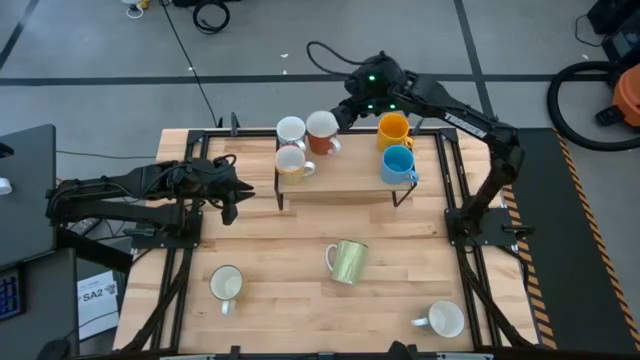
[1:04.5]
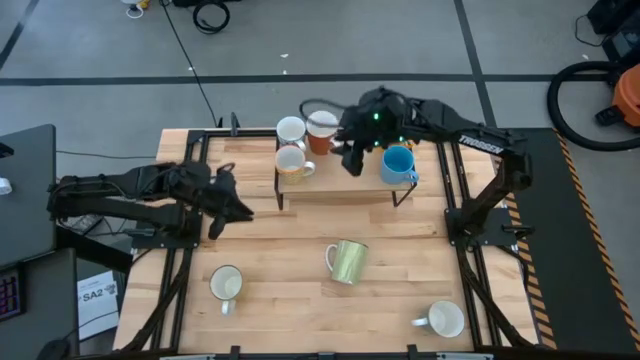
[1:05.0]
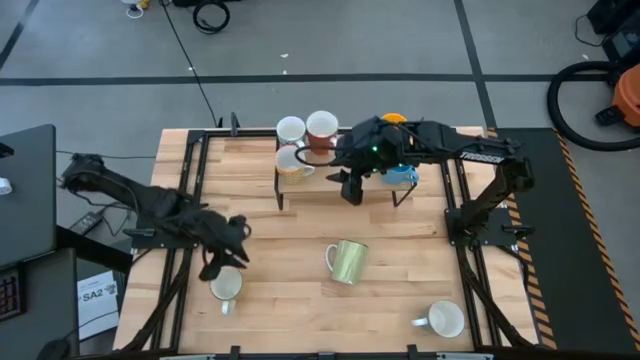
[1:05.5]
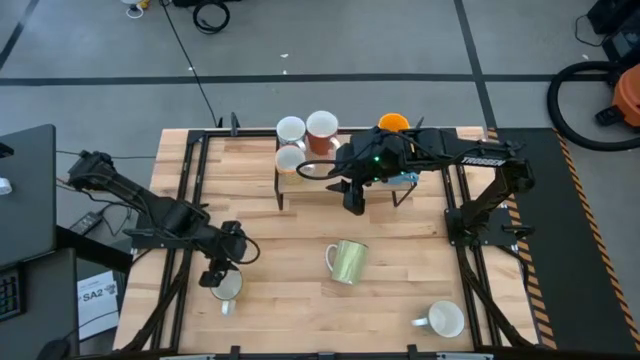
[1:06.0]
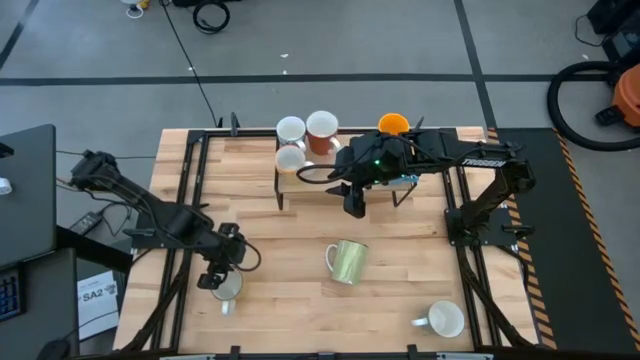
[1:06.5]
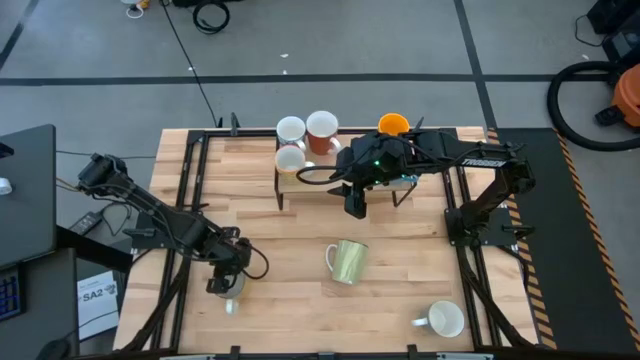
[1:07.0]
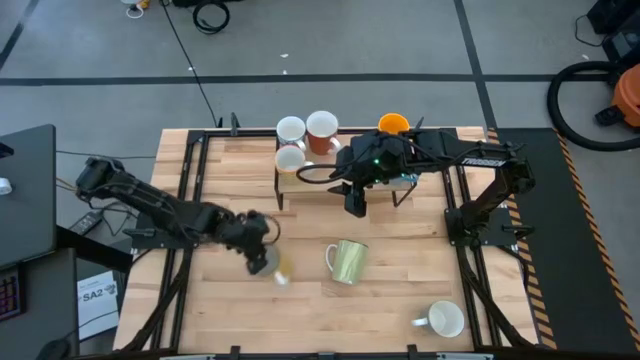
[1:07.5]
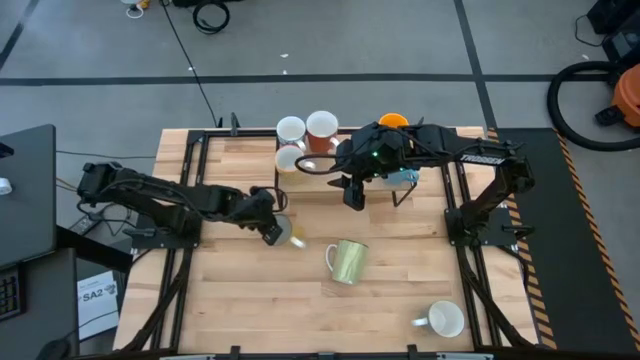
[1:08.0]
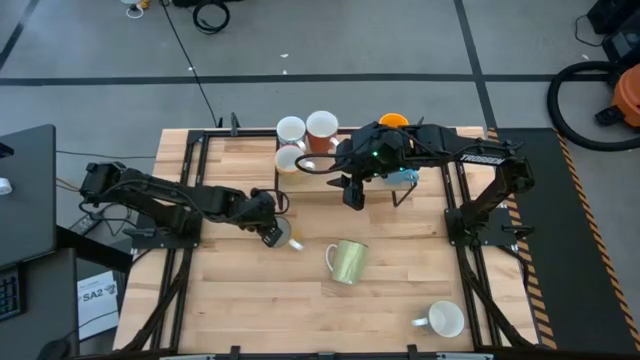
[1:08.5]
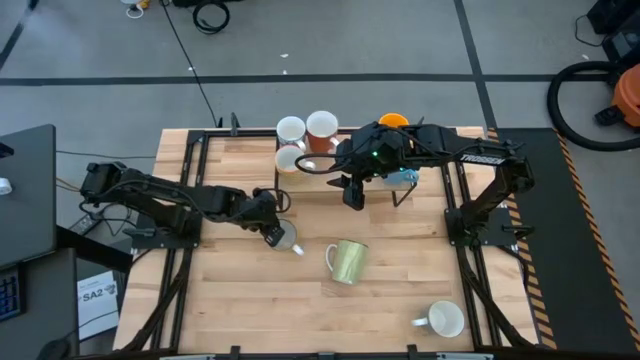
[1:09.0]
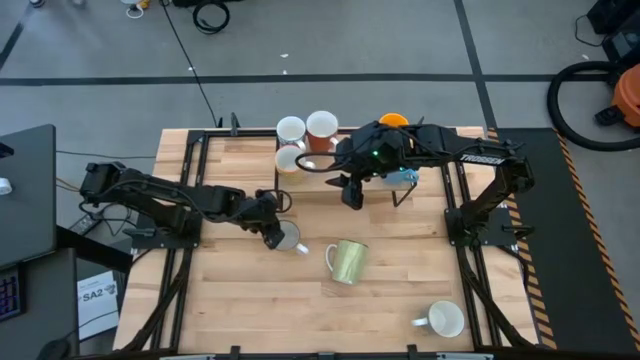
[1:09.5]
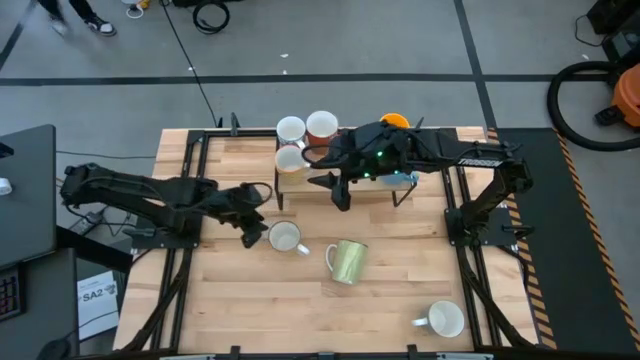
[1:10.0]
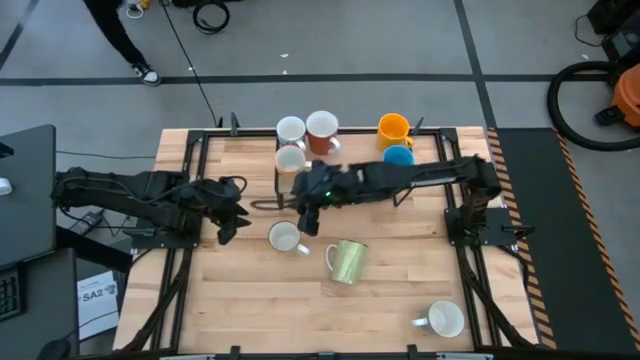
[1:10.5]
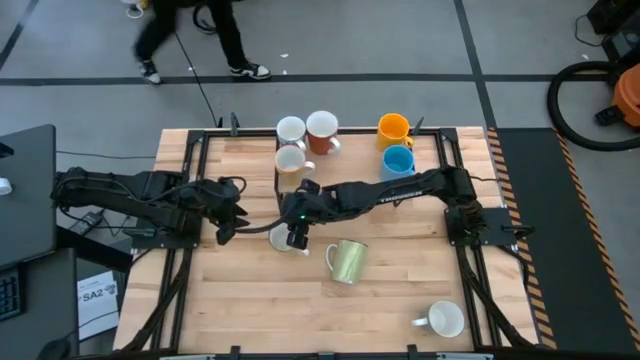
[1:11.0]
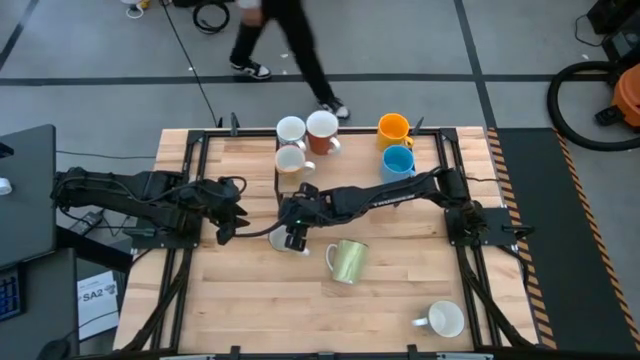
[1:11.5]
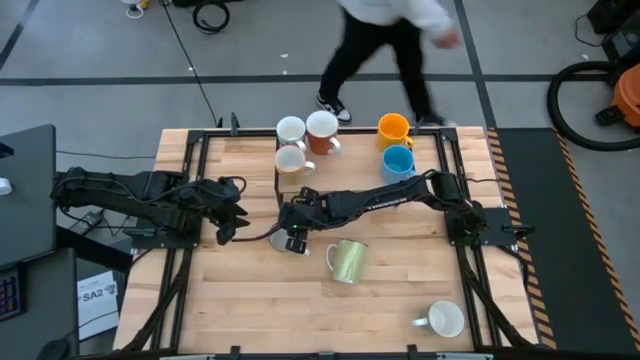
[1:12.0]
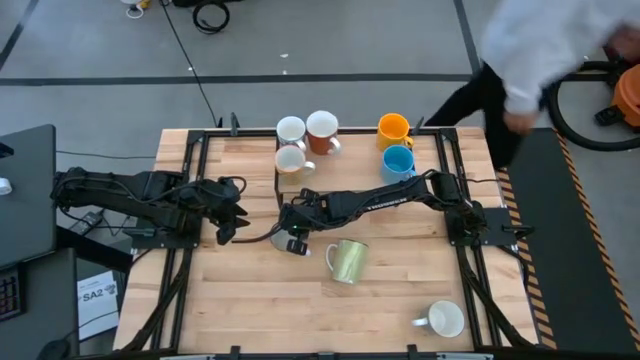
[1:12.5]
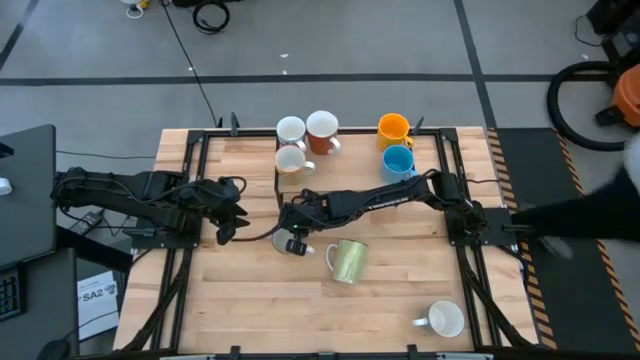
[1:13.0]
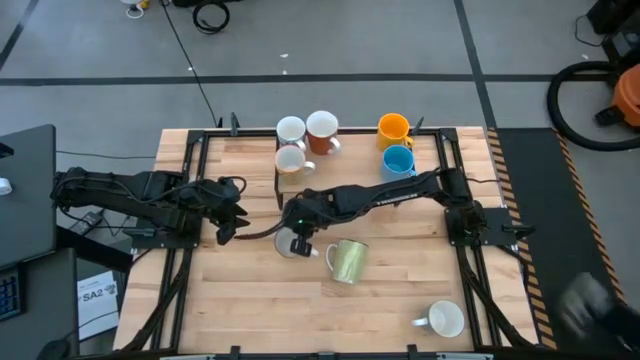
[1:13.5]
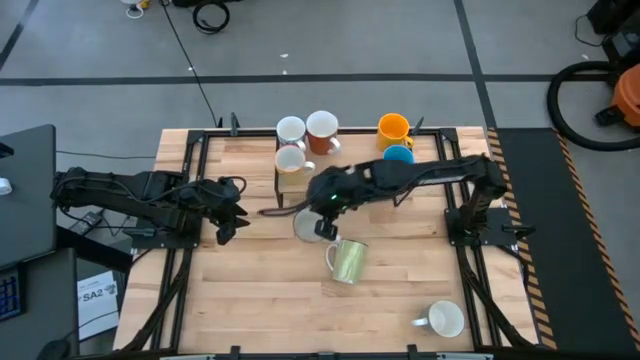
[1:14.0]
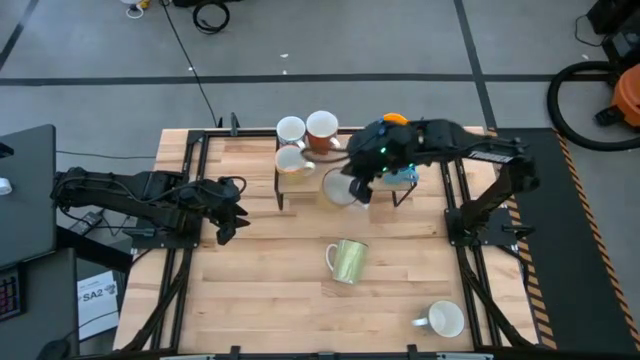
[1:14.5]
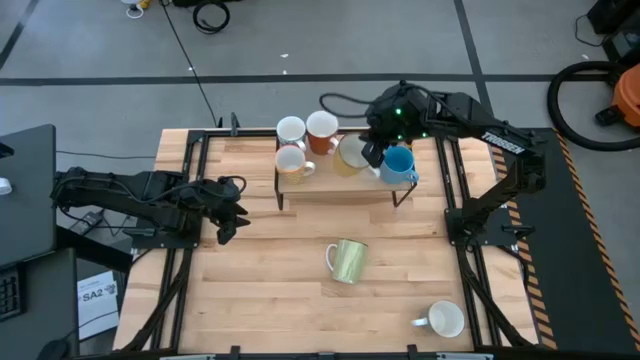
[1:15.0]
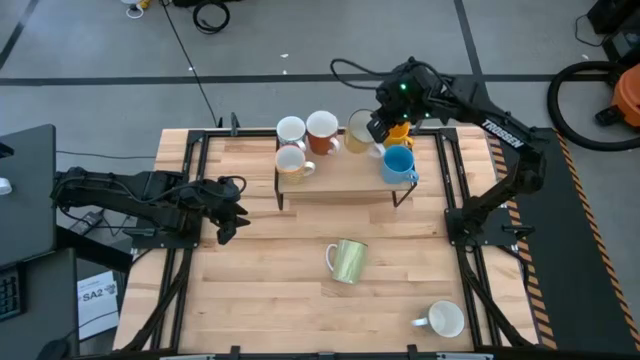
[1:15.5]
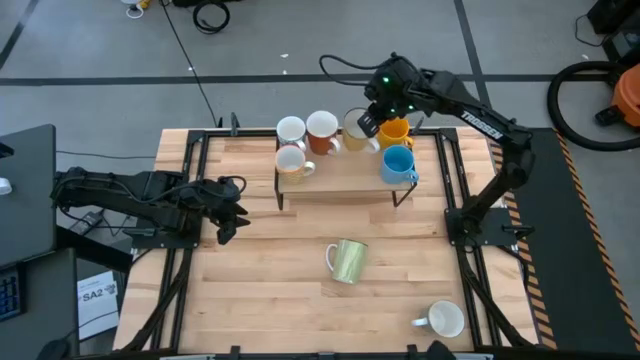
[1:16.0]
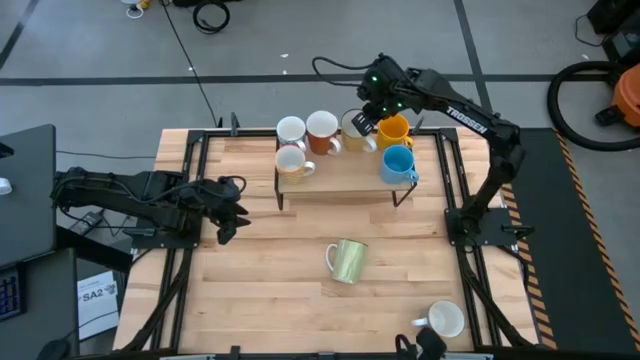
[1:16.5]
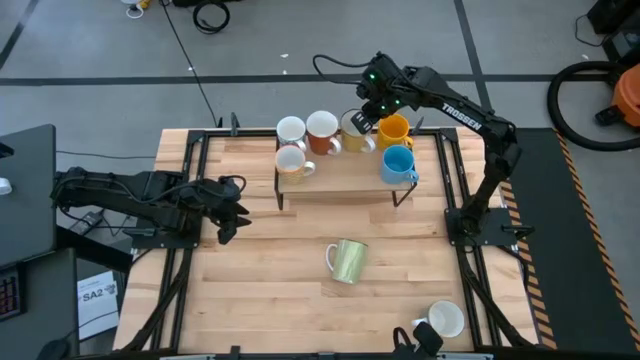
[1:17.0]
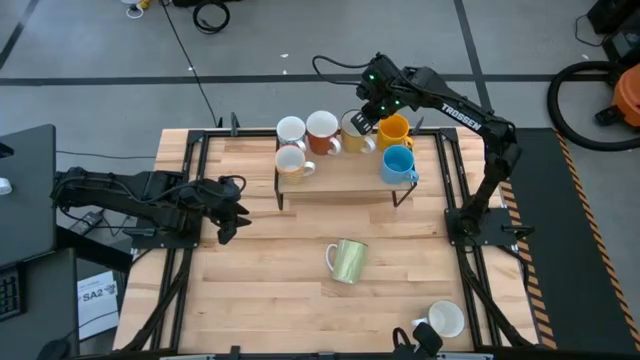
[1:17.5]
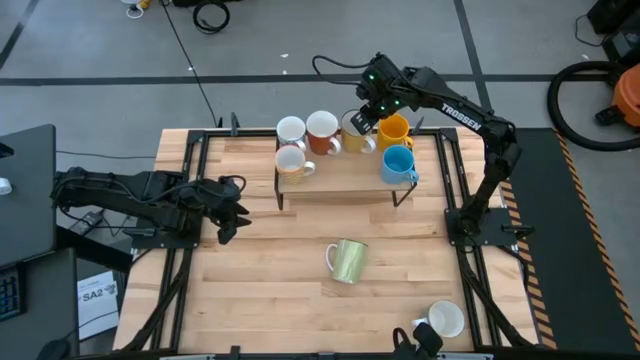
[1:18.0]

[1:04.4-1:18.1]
Task: Place coffee mugs
Put the yellow mug on the shelf

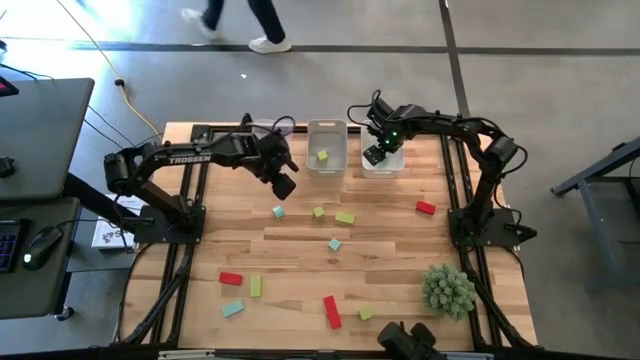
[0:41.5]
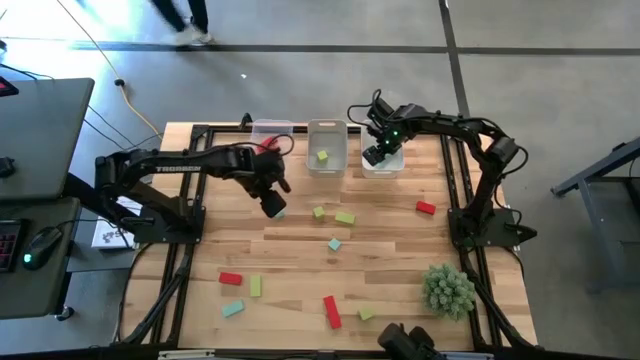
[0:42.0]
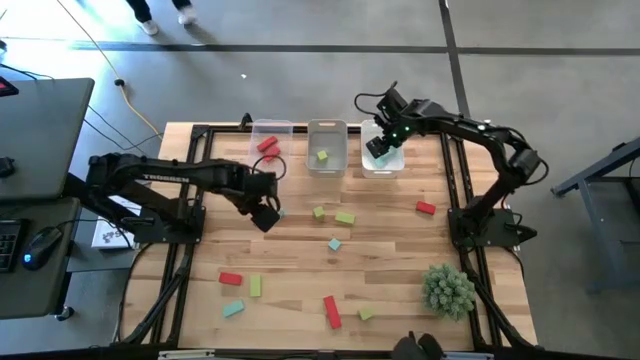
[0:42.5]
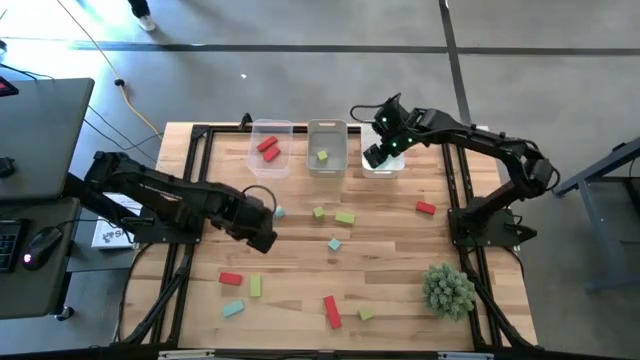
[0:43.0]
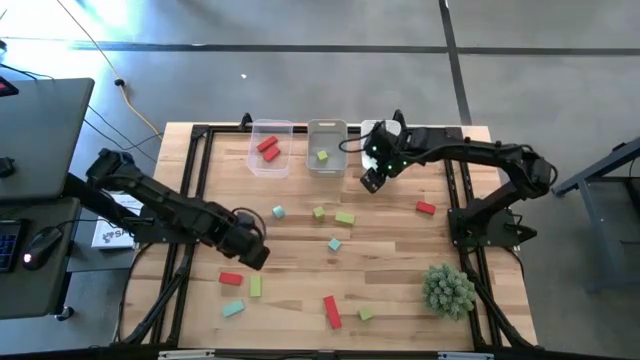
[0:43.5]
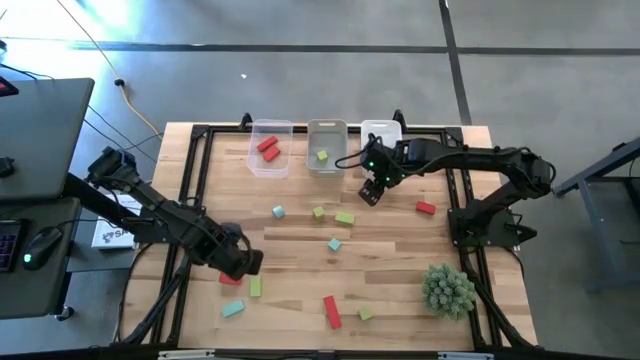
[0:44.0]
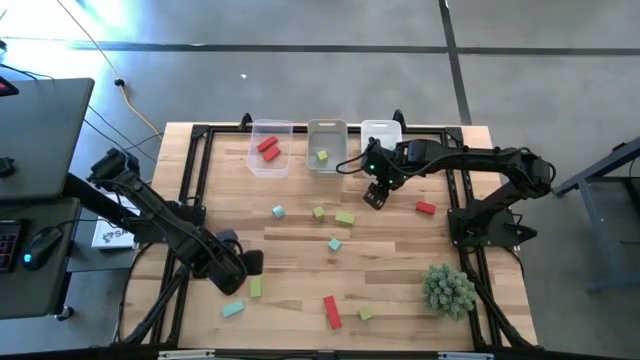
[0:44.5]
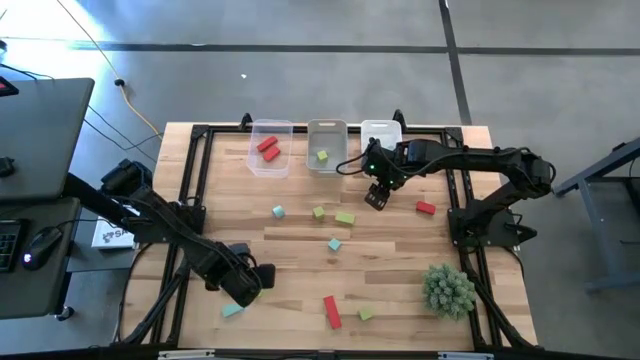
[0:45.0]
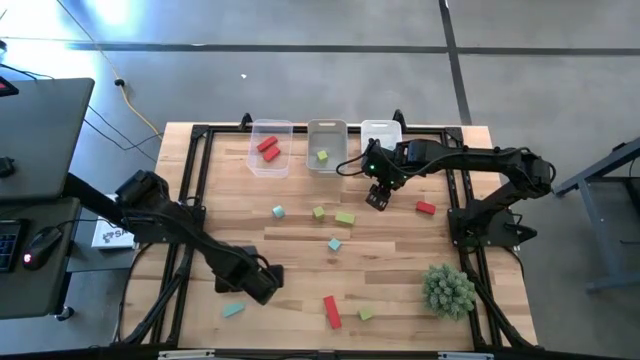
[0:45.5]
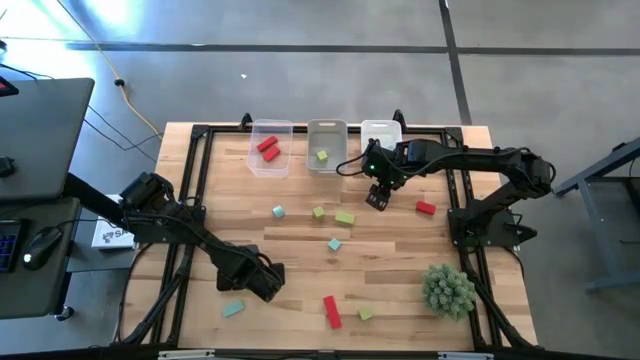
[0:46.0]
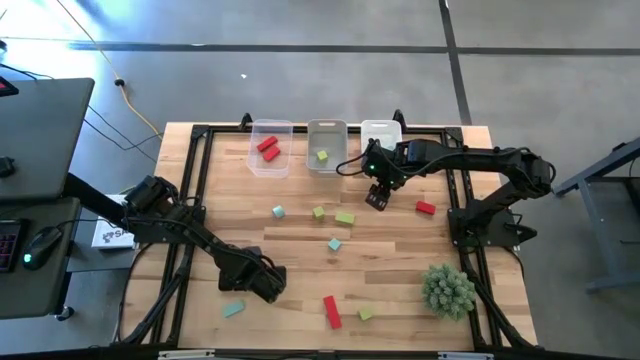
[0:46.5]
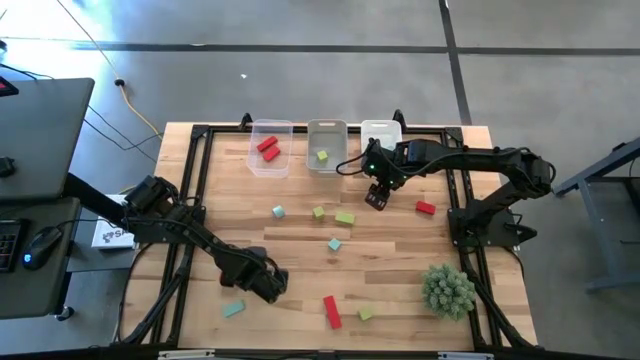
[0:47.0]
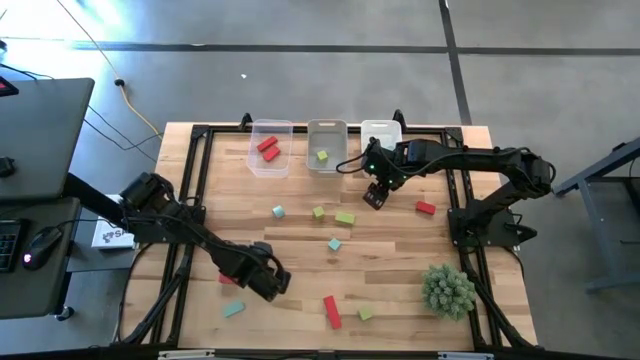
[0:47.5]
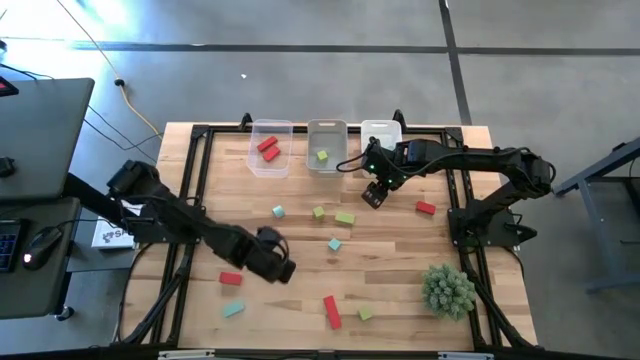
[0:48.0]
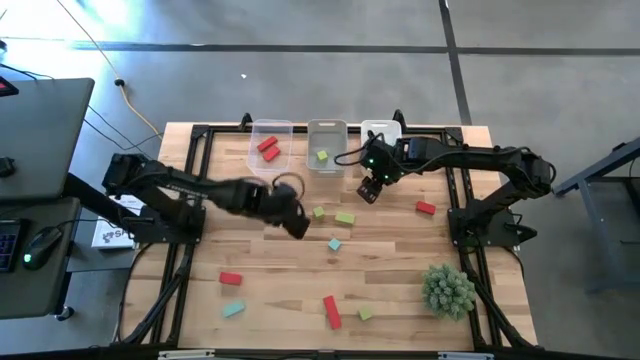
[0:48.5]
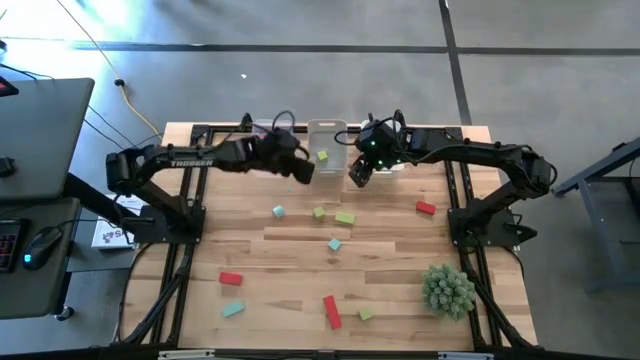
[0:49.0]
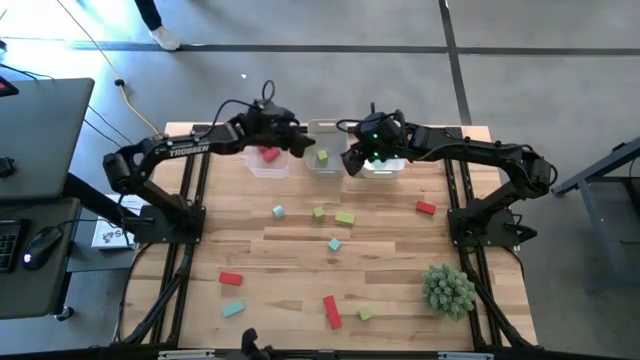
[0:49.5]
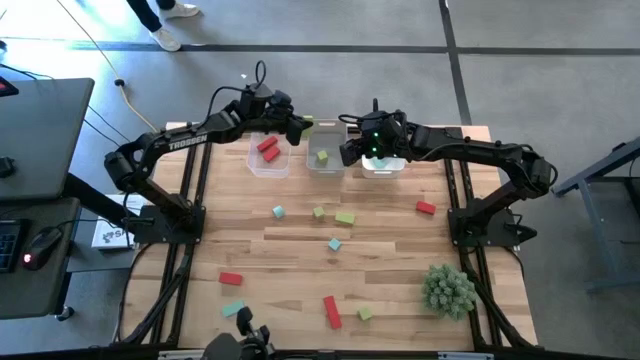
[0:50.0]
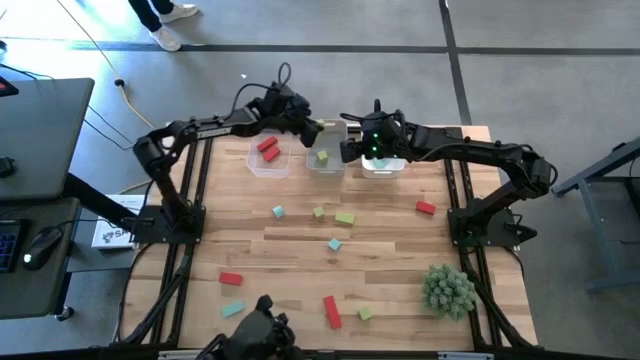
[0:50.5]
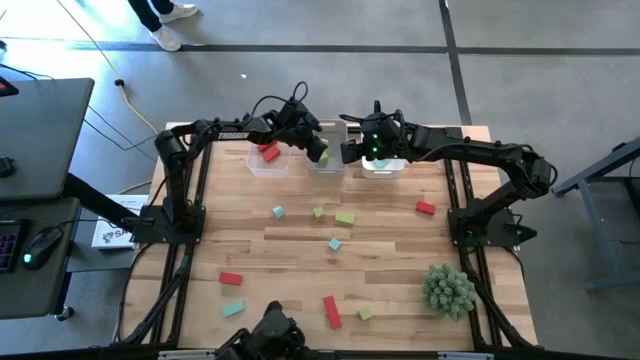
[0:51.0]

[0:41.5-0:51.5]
Task: Sort & place blocks by color
Put the green block into the gray bin
